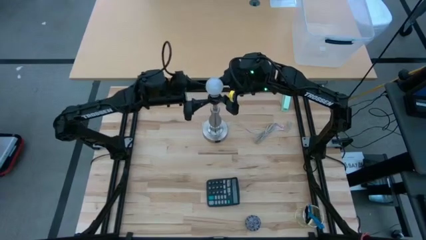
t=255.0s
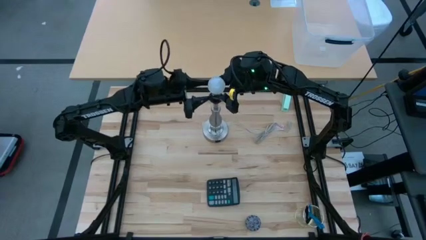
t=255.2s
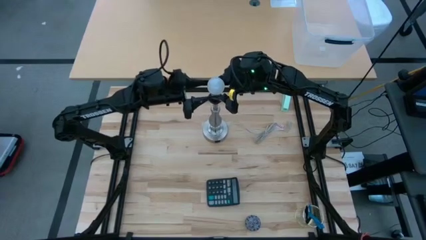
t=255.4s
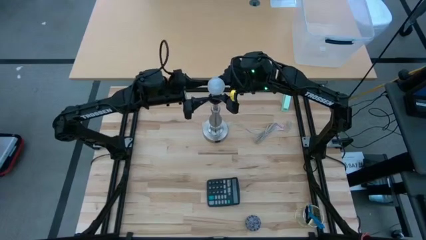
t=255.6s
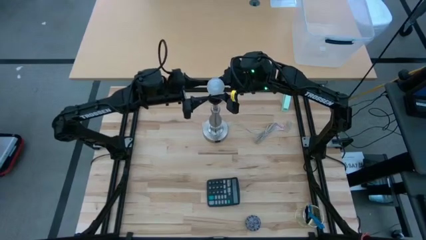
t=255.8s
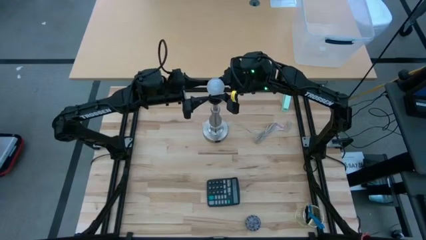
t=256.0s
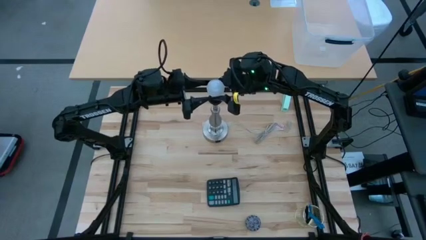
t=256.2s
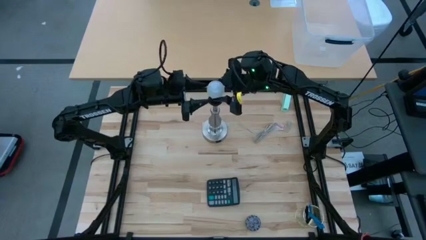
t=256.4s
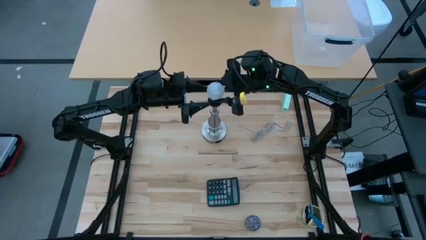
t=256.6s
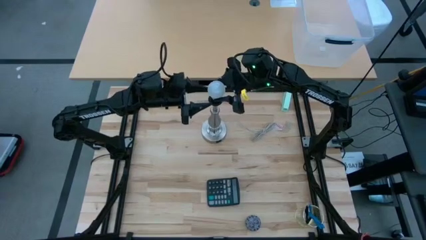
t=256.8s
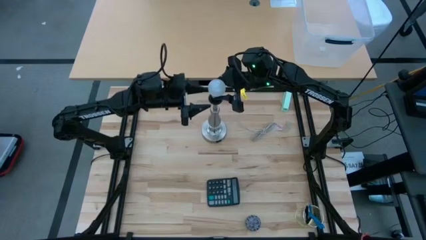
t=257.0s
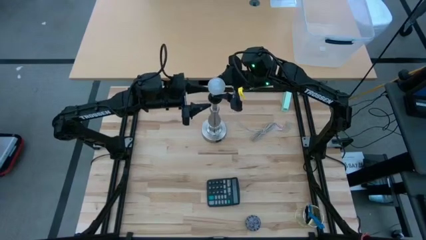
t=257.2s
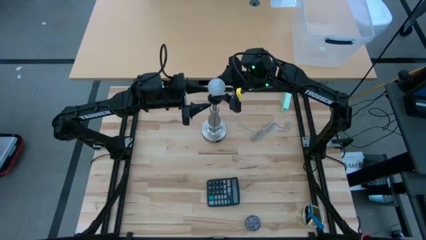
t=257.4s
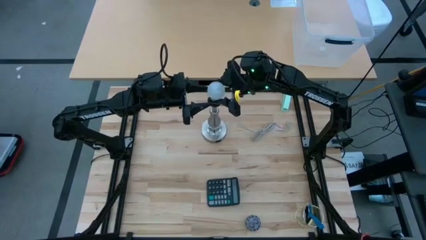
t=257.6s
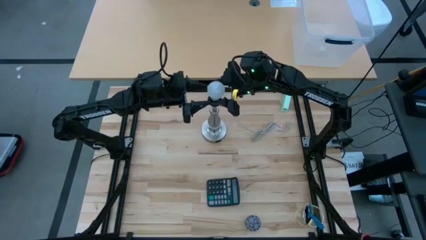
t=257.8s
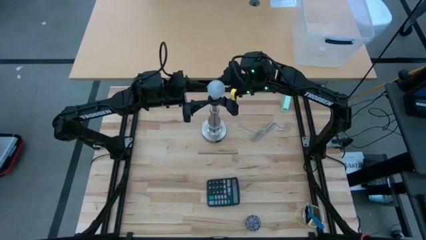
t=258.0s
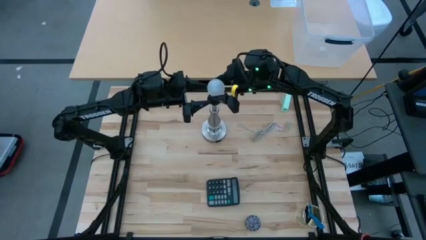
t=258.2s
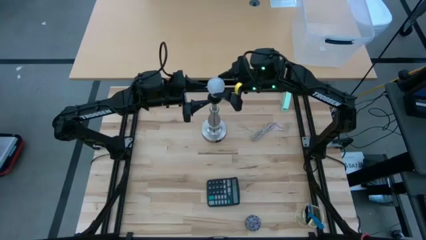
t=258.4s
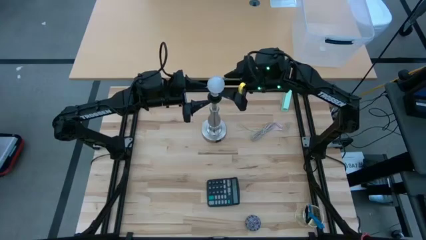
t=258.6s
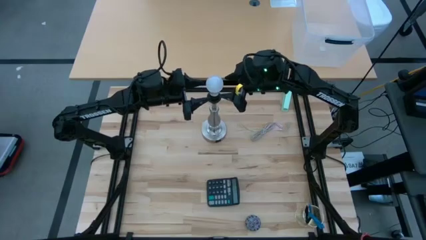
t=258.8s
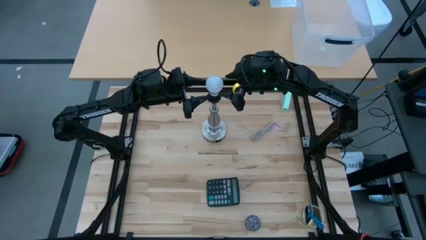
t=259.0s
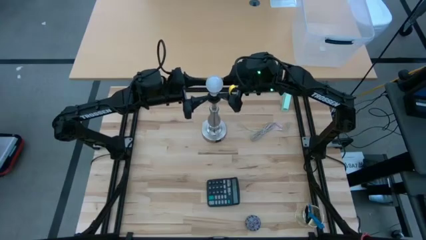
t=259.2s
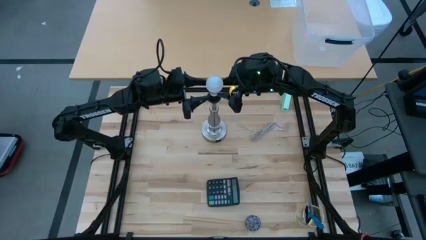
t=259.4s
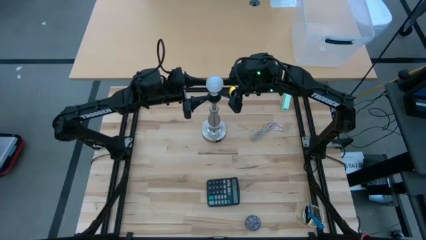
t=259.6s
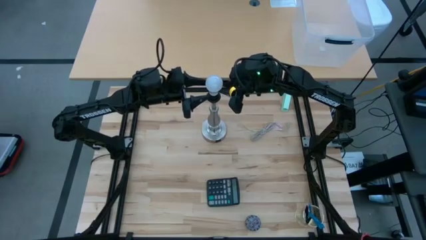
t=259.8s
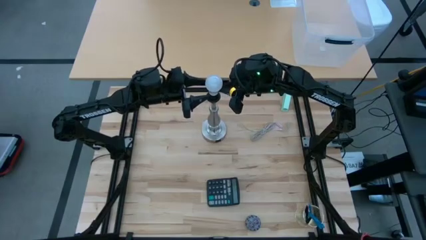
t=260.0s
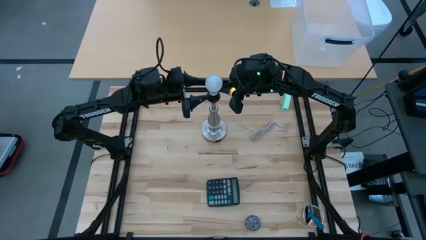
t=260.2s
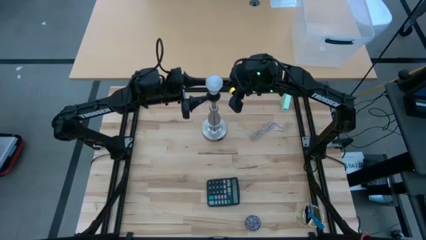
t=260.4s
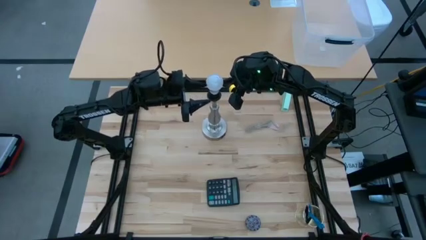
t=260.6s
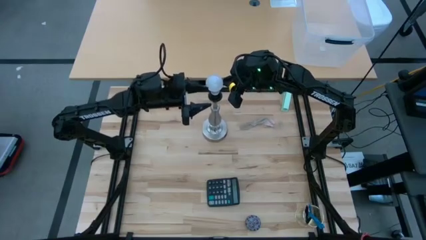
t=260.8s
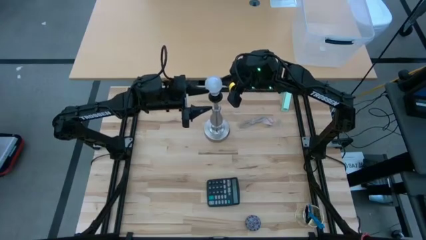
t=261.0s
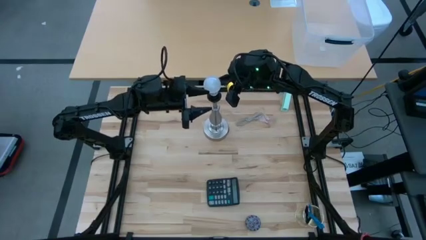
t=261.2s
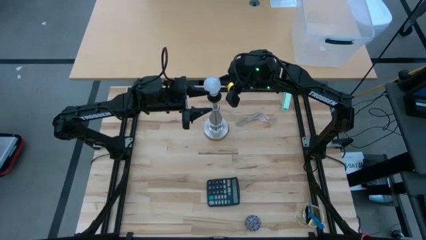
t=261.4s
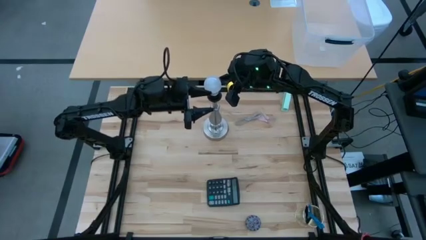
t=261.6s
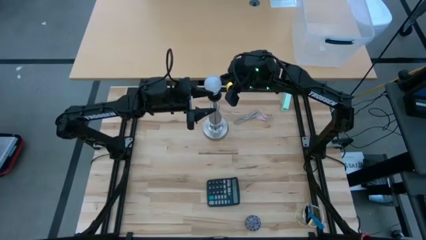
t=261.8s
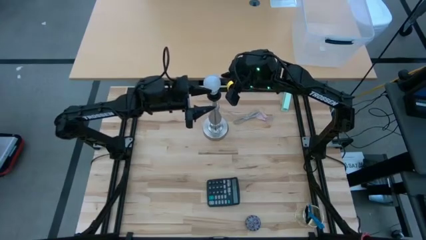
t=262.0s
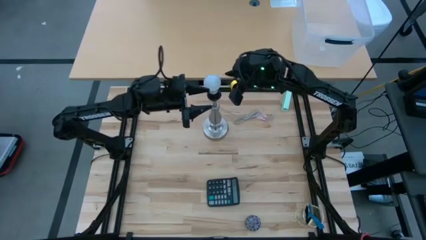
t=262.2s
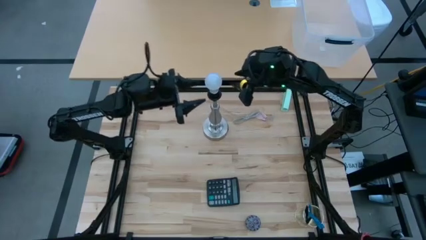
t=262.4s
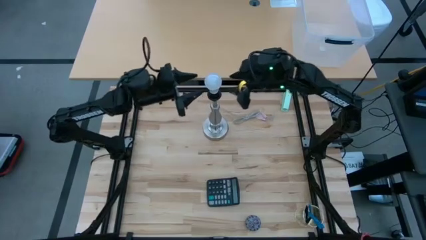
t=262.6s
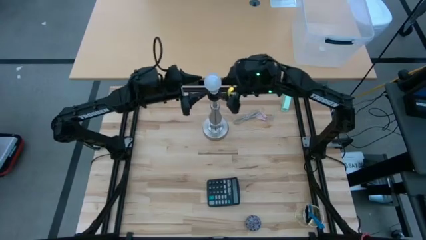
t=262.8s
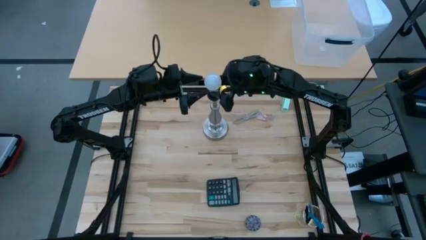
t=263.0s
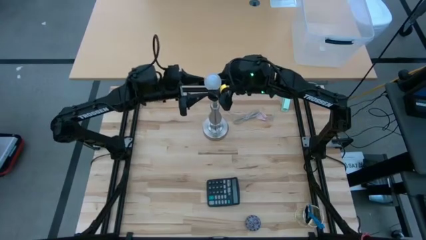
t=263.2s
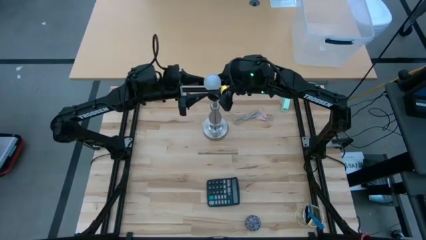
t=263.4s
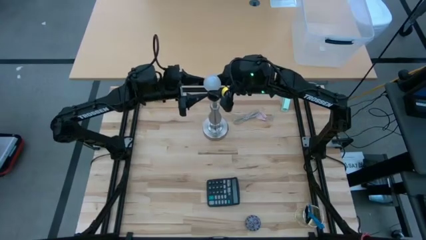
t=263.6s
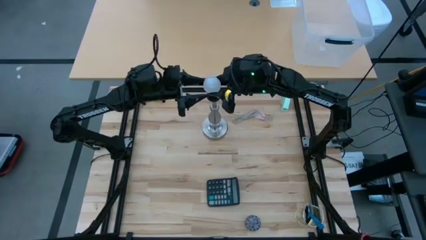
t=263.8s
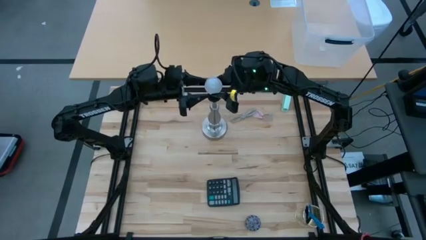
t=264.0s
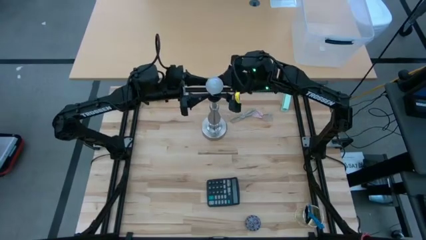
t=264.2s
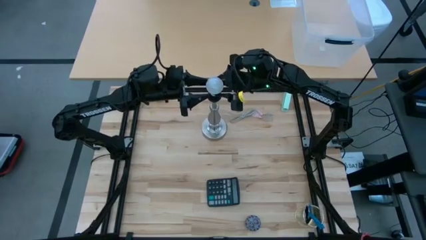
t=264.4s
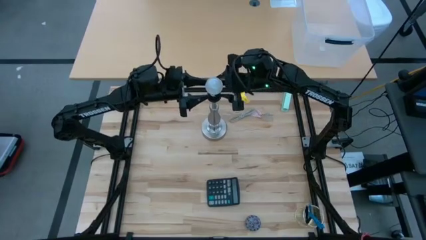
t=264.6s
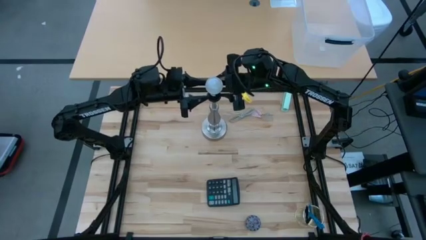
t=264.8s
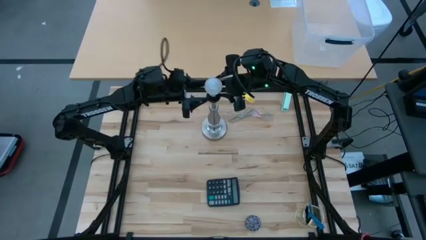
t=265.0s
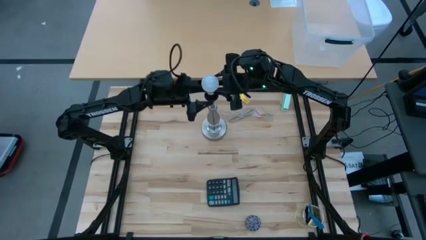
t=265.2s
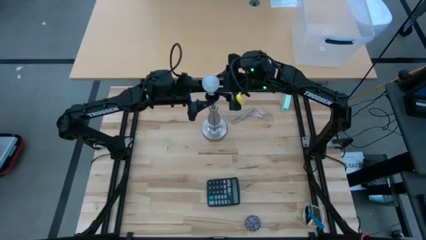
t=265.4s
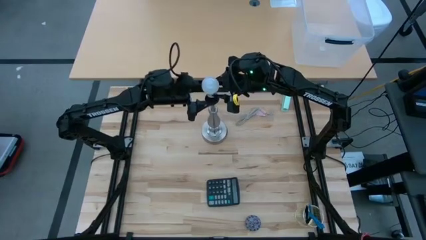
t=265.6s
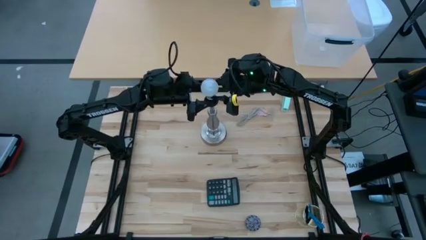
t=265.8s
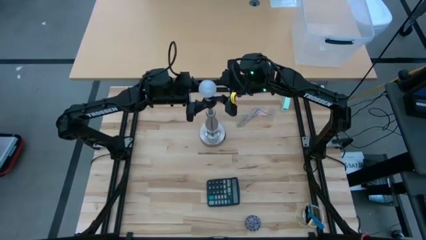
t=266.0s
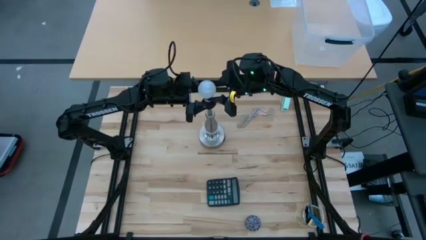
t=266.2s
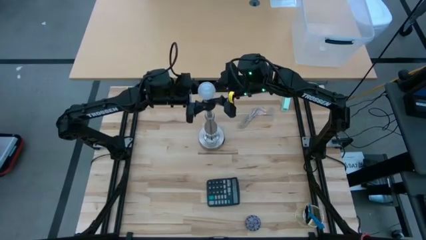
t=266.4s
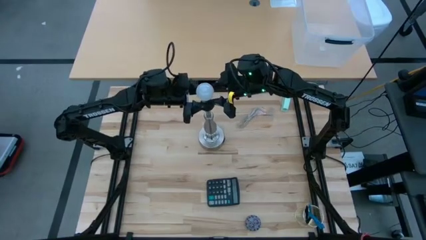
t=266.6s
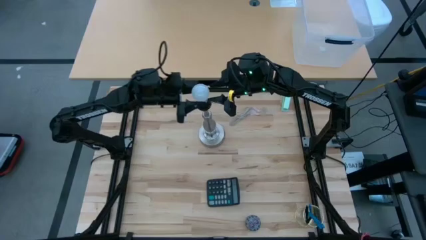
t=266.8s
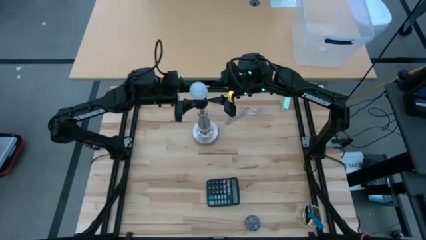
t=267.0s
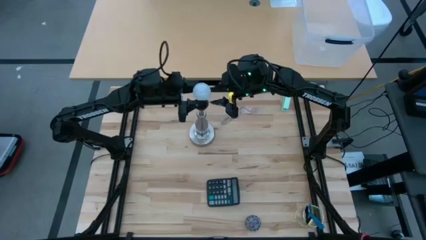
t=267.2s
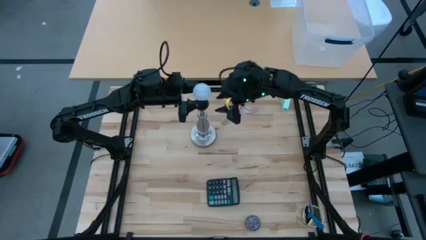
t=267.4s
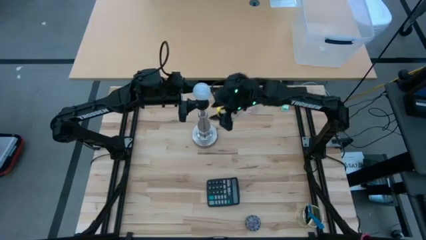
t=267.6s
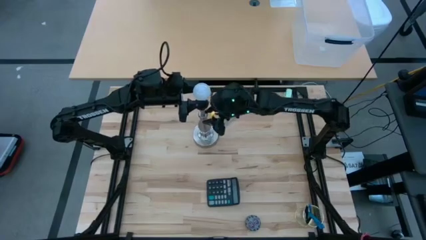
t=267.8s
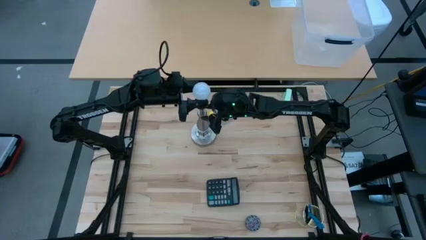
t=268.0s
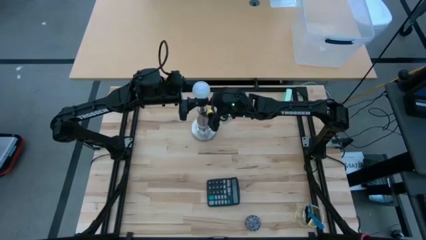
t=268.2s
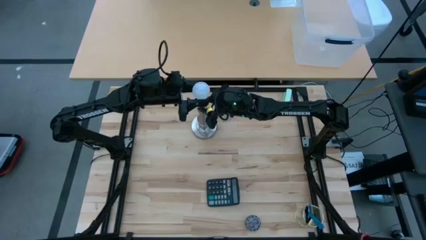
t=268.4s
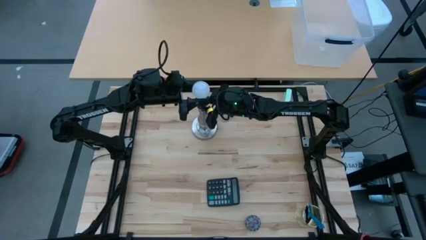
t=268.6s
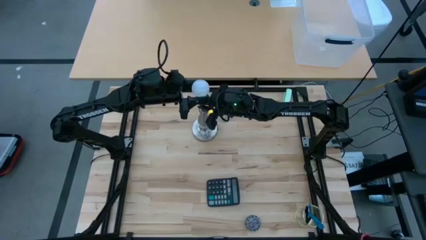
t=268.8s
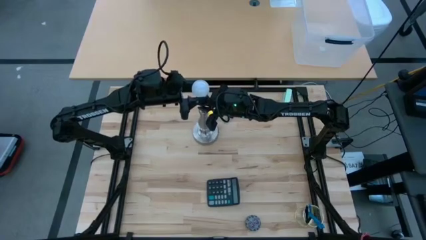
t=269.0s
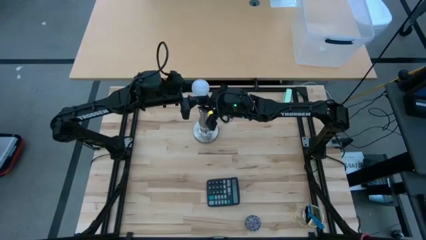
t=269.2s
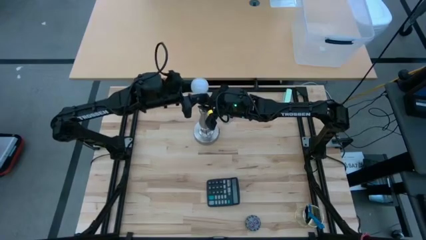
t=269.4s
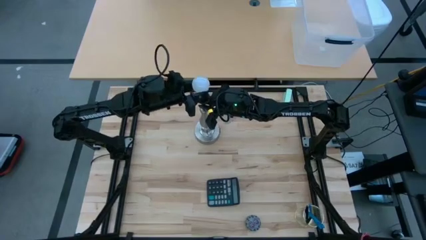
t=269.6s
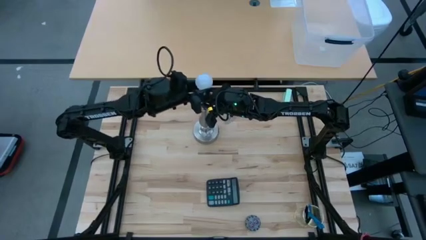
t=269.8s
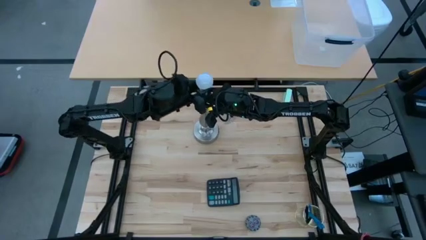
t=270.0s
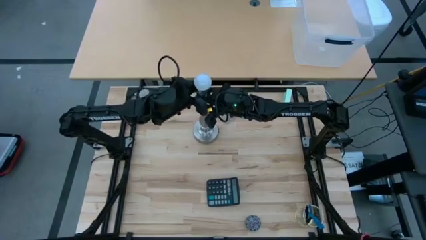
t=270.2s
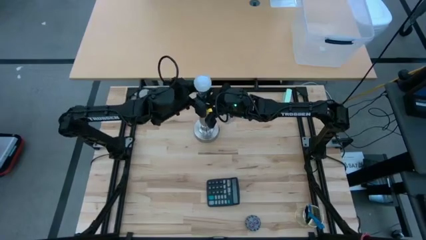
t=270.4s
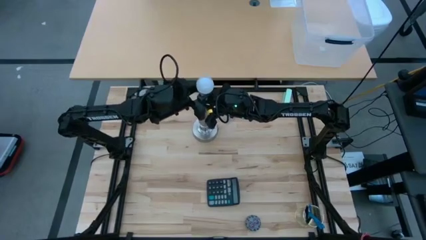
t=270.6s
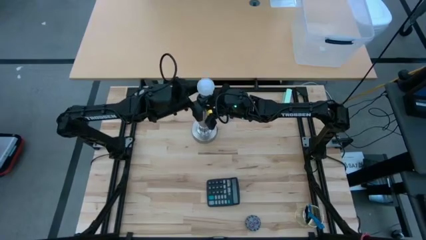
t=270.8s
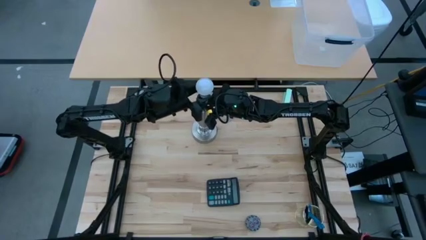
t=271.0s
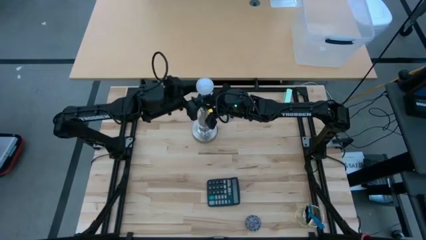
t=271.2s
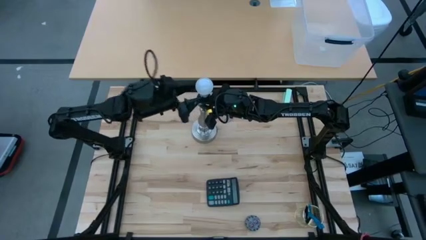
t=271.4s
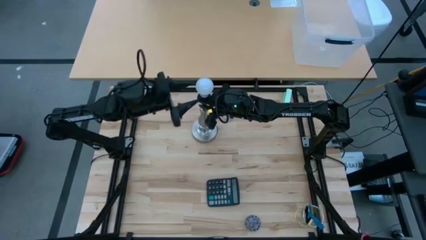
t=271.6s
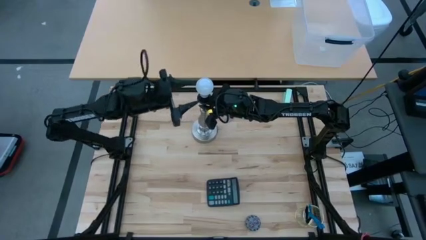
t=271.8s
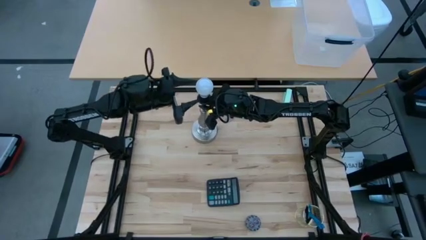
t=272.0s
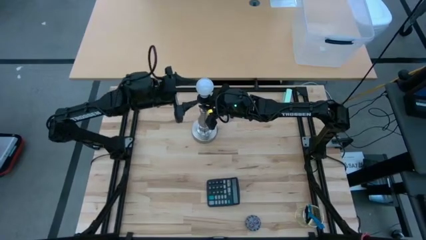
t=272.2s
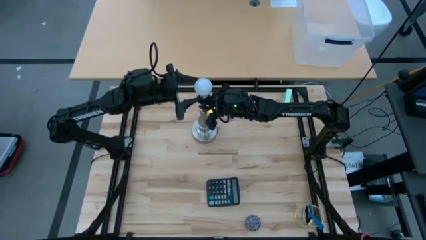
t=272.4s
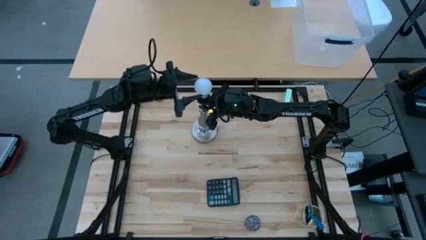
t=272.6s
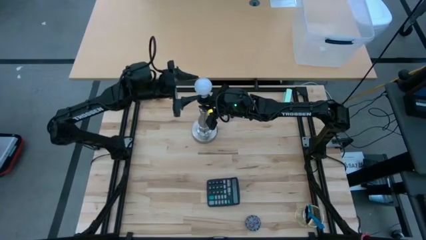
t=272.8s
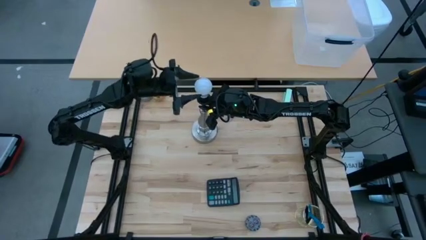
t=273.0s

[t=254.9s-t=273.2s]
Task: Screw lightbulb
Remove the light bulb from the lamp
